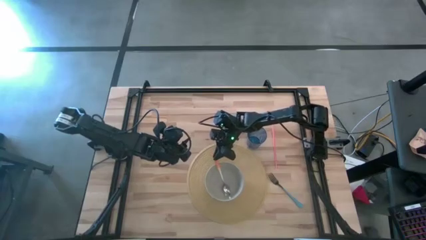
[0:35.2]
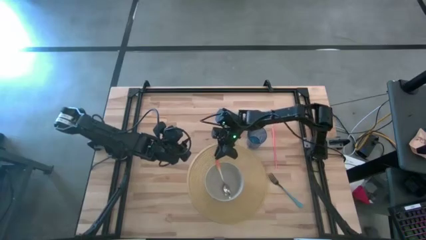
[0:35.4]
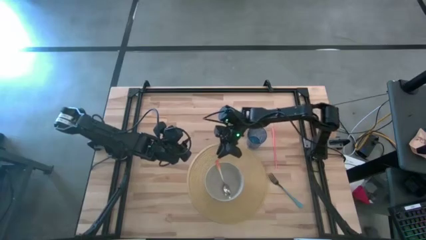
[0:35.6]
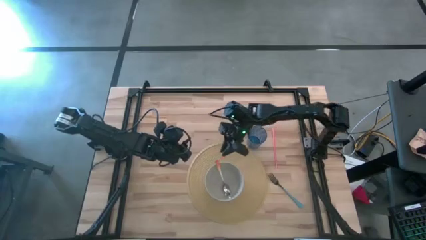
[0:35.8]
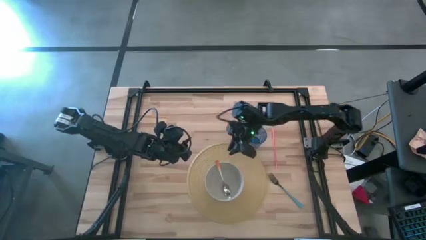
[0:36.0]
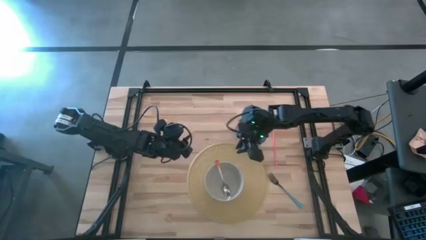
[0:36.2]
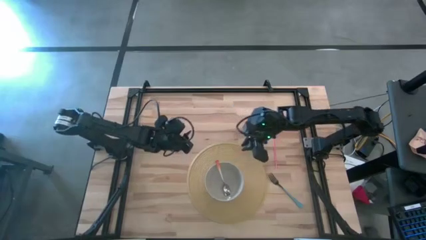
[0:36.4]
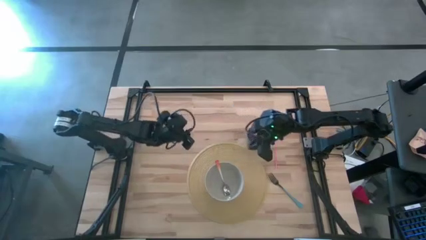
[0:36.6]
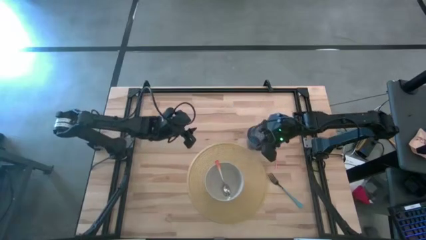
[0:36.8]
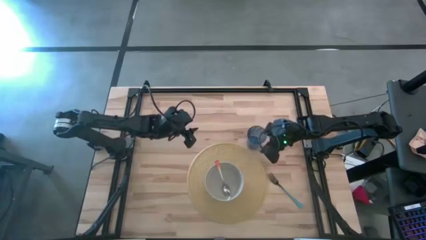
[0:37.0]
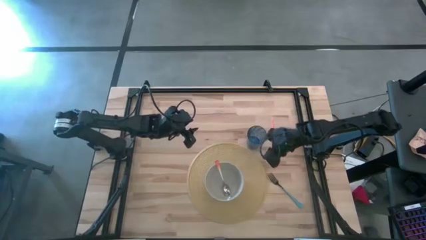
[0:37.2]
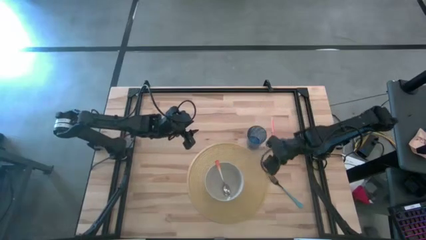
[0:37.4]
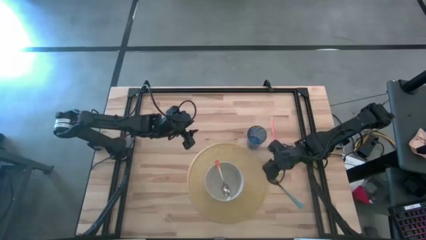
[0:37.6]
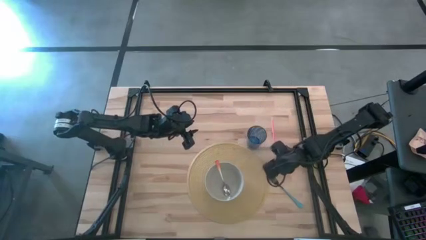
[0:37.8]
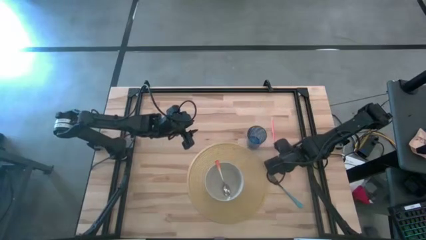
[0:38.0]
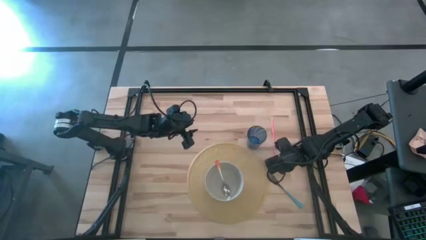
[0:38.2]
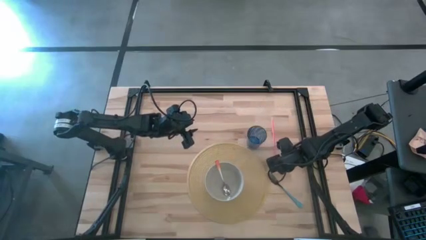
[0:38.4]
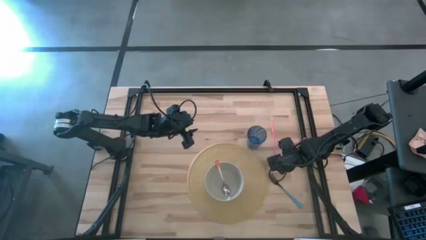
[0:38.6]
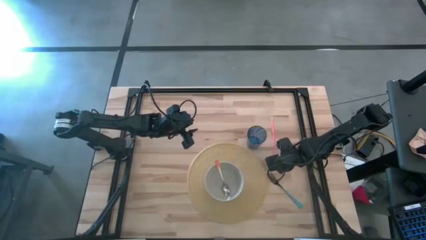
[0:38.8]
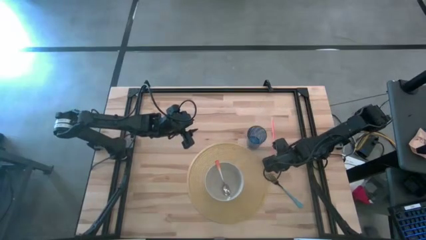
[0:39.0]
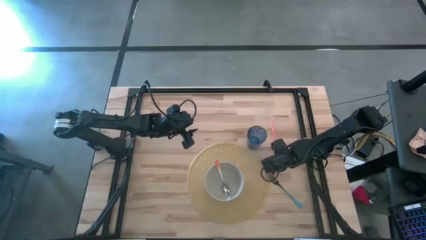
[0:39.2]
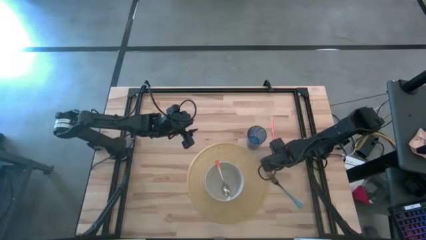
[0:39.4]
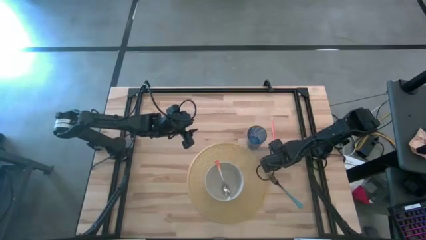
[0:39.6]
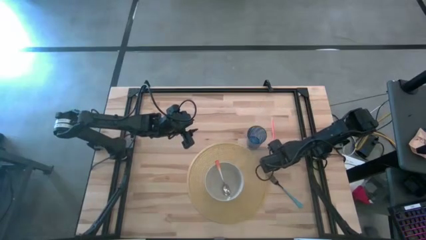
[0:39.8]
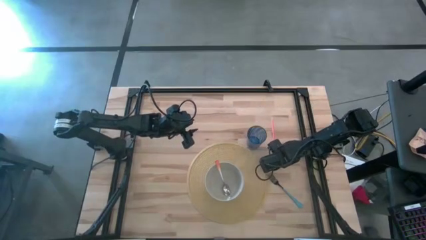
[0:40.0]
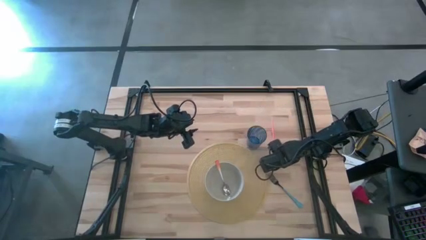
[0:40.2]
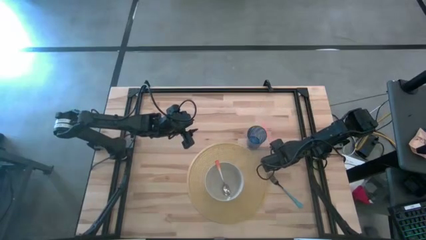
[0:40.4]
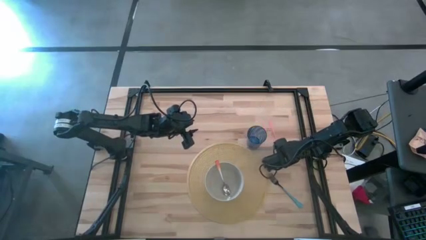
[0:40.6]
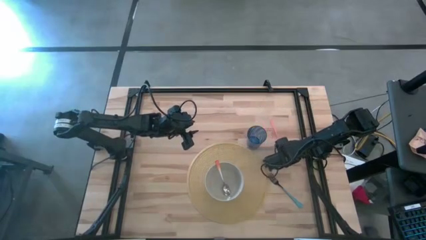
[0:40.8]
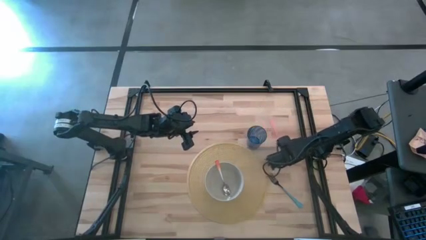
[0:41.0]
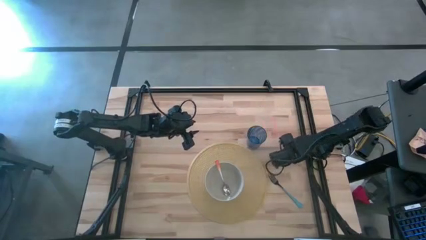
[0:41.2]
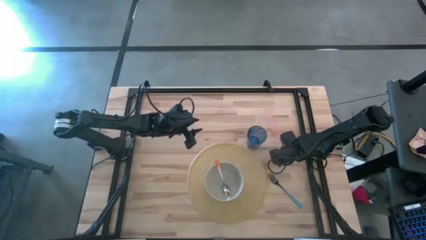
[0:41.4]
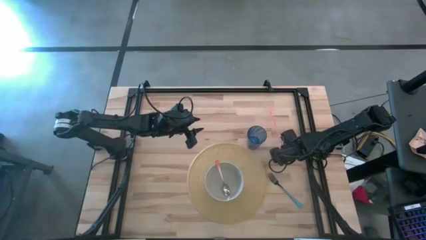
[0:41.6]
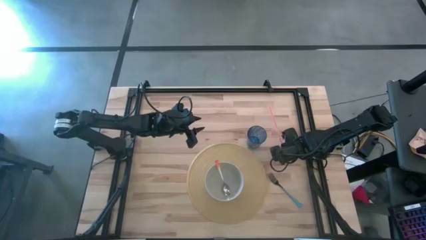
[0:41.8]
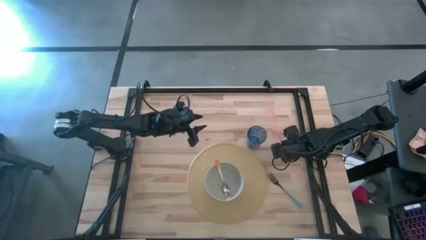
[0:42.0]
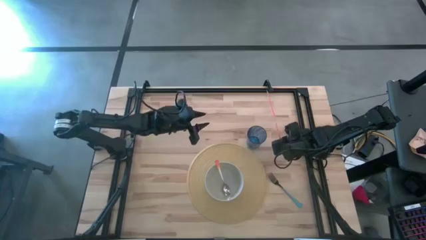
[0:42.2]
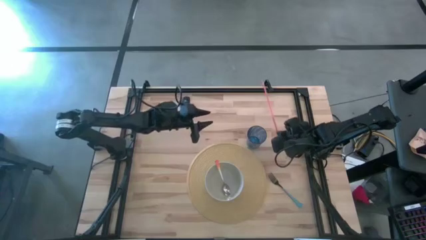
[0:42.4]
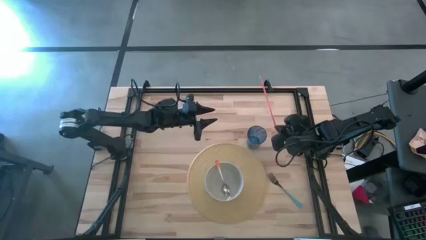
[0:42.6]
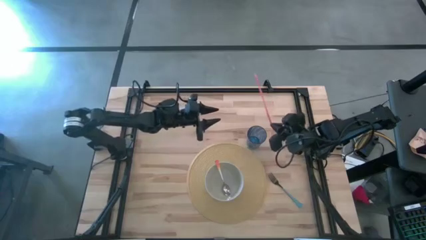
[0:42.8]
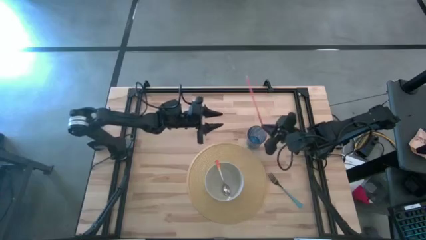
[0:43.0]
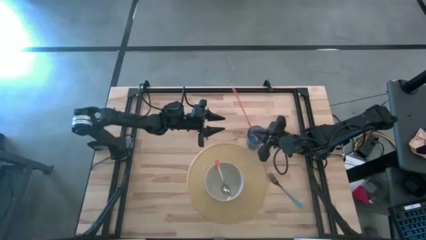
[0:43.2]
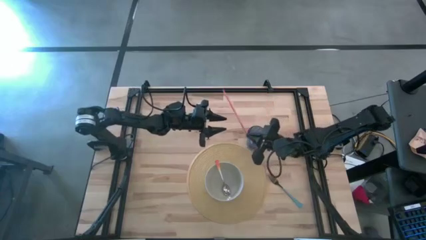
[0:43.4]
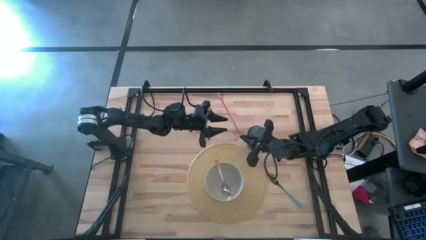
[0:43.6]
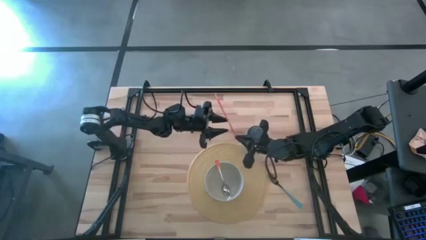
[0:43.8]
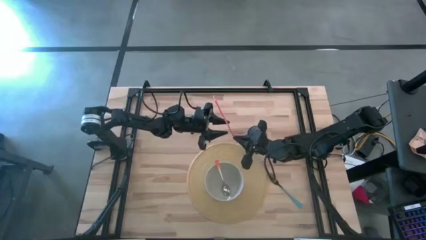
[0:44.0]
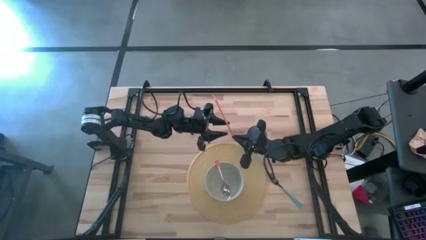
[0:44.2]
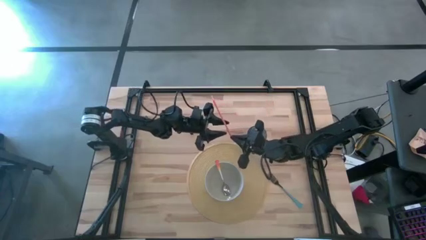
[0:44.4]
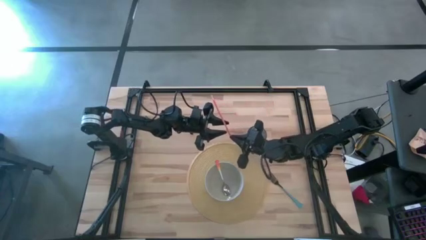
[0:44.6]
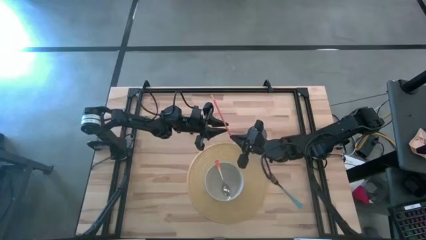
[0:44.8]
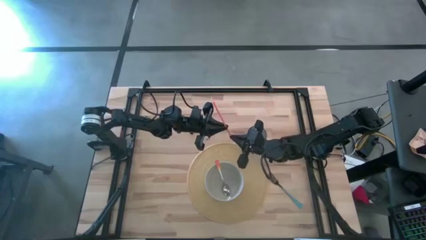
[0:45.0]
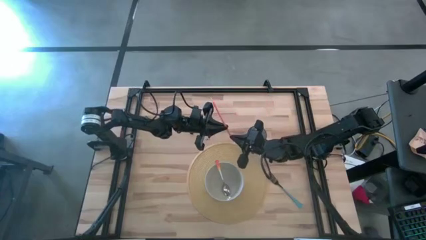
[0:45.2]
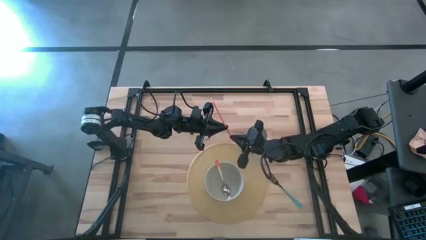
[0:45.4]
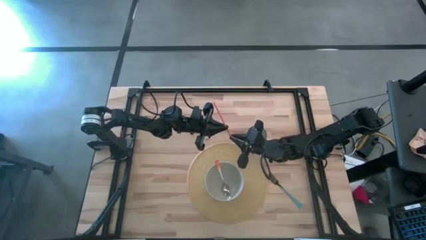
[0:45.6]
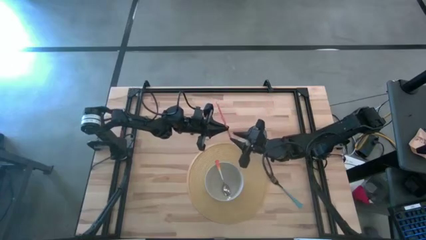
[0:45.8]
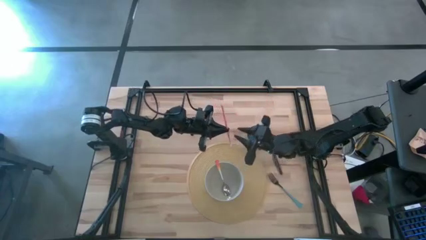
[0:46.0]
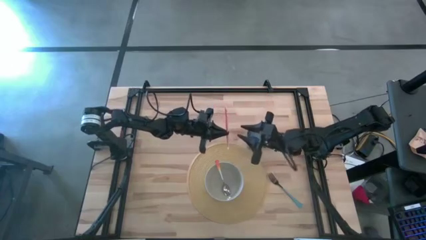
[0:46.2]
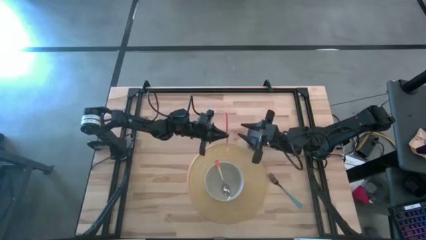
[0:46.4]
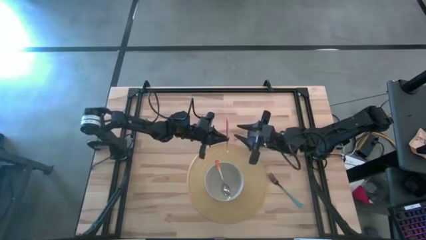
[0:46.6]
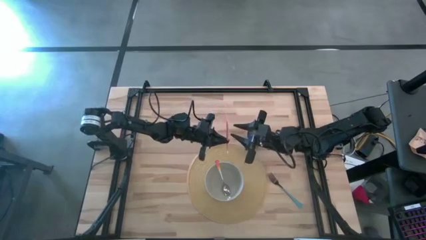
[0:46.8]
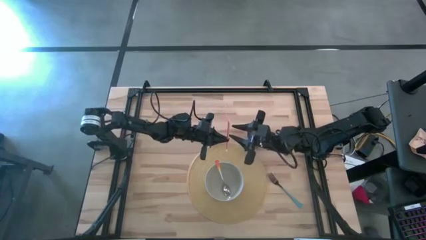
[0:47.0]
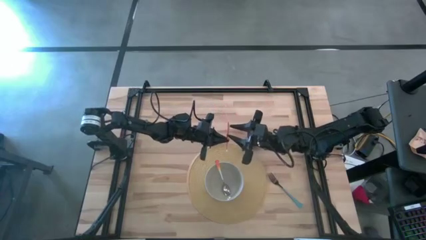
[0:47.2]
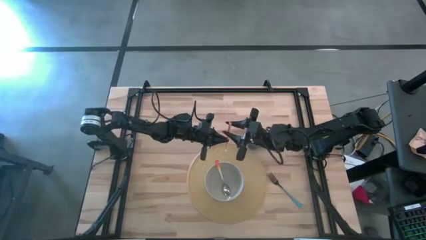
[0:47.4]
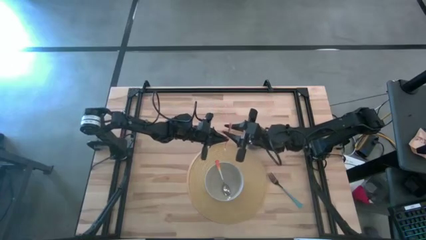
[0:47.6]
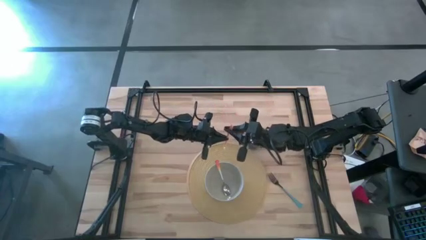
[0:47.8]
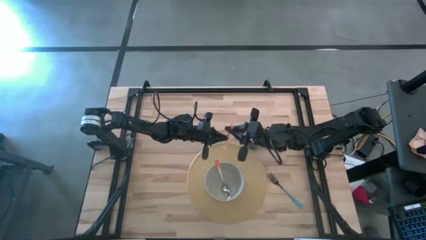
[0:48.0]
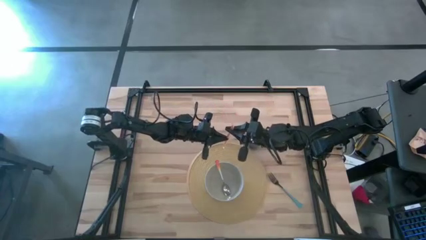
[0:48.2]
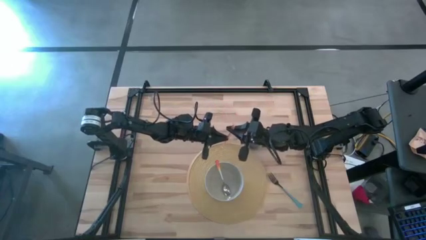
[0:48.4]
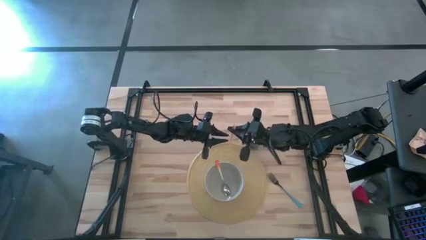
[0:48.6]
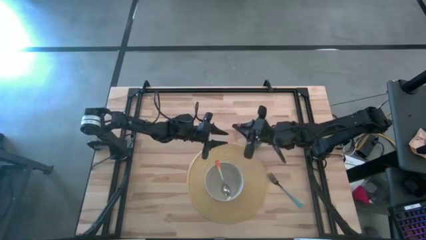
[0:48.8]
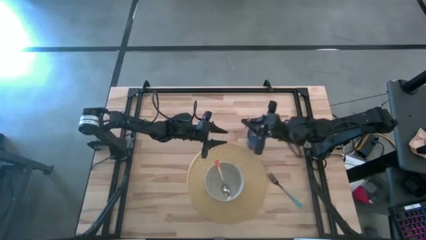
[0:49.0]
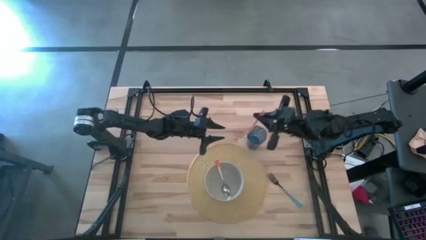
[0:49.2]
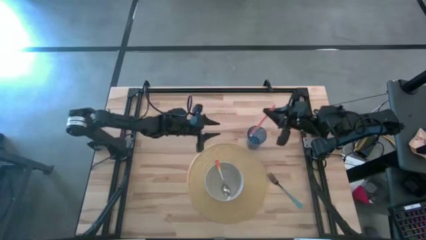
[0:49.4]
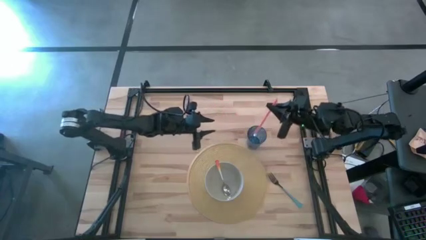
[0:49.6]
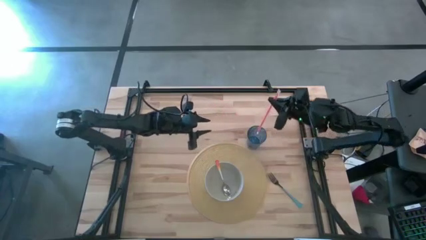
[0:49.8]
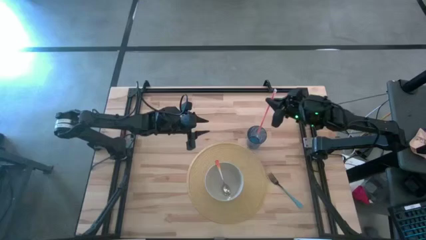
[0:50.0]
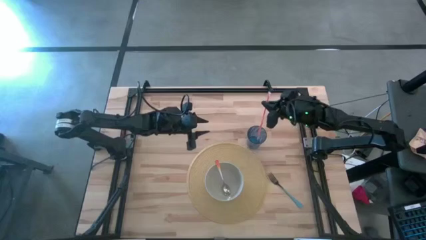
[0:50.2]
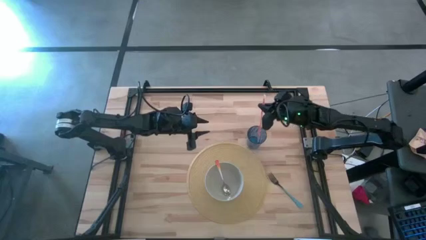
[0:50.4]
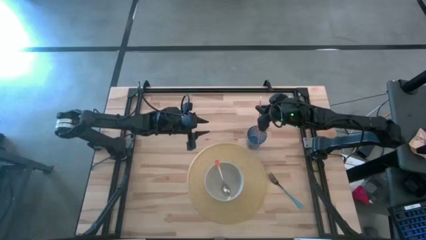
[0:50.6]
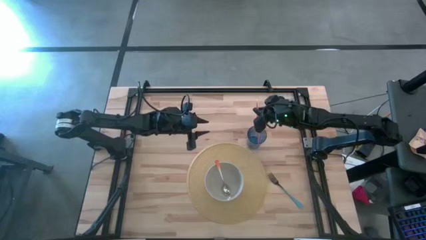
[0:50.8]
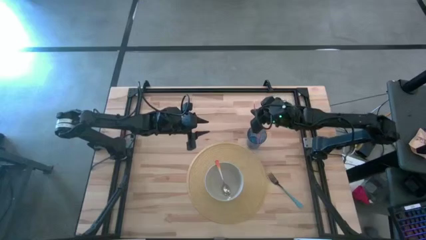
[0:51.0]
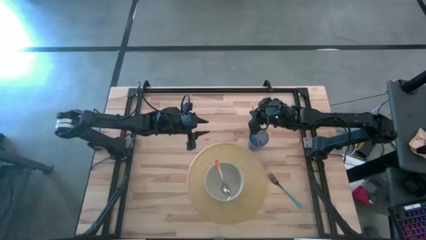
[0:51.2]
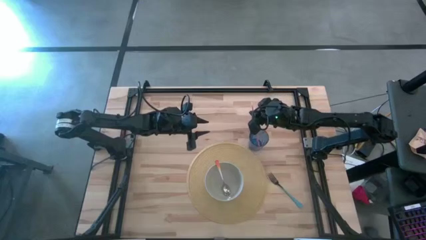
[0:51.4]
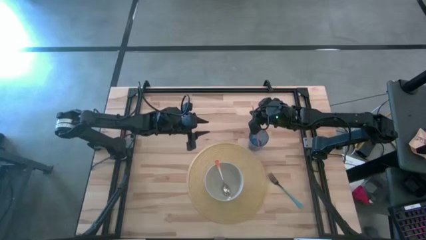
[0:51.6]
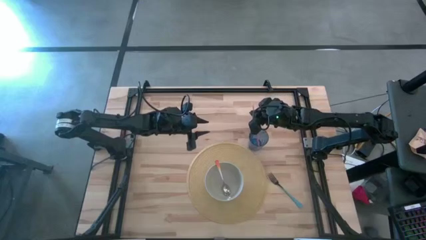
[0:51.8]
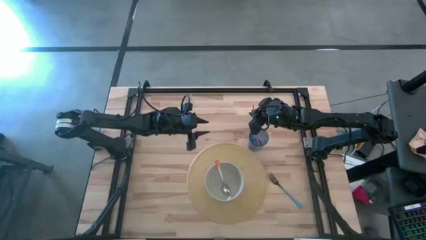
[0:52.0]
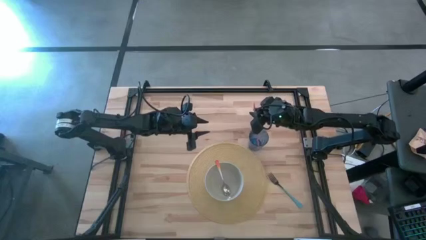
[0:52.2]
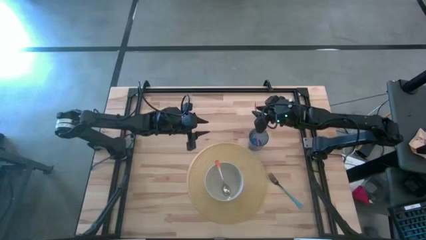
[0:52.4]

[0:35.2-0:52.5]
Task: Pick & Place Utensil
Put the red straw into the blue cup
